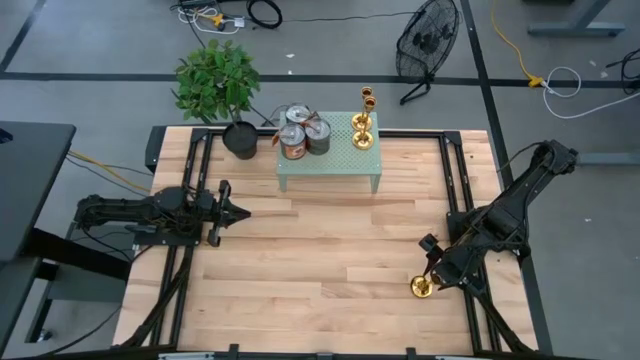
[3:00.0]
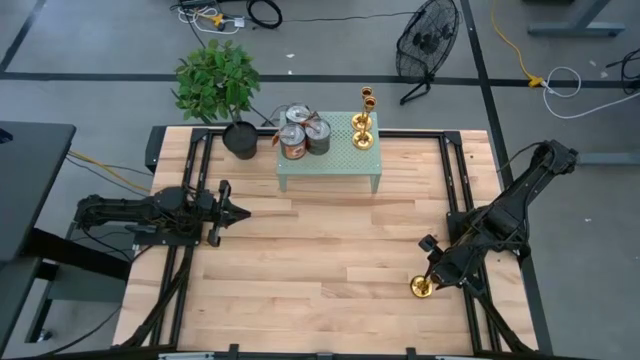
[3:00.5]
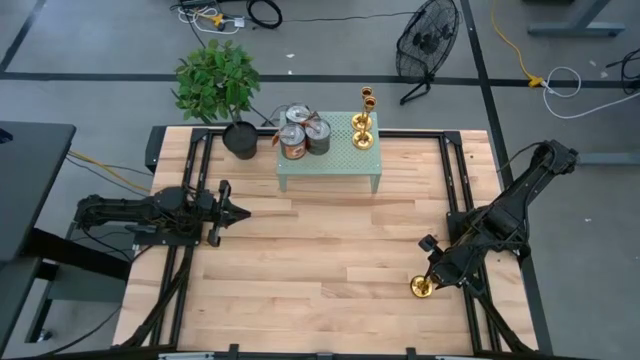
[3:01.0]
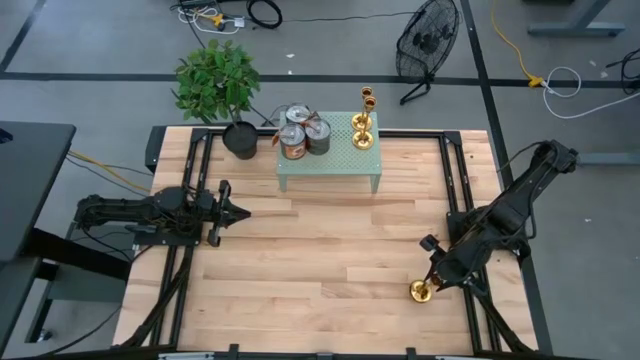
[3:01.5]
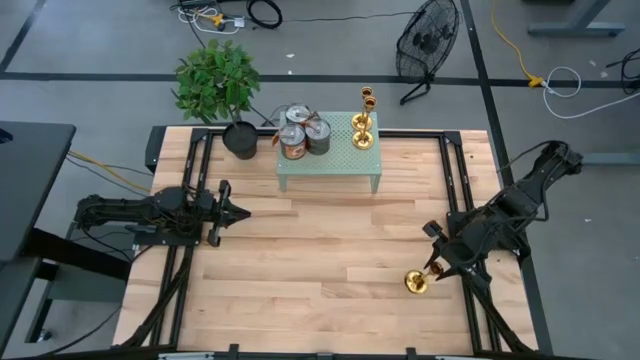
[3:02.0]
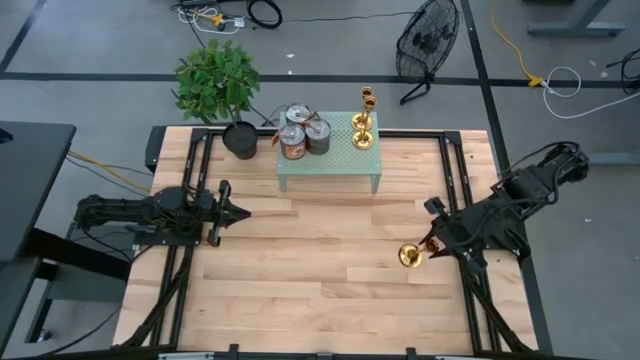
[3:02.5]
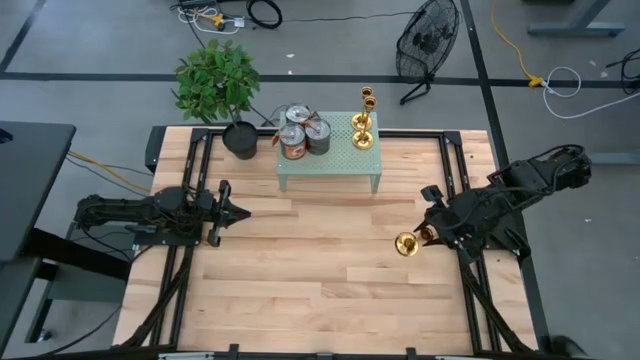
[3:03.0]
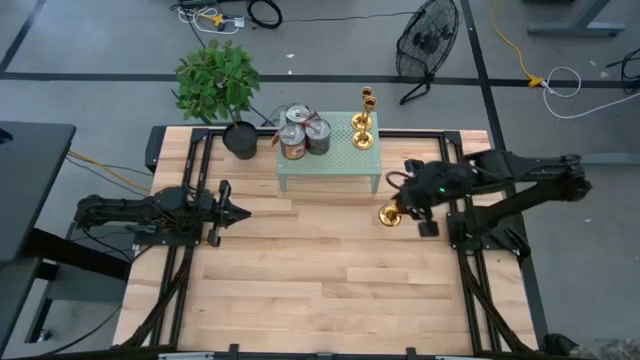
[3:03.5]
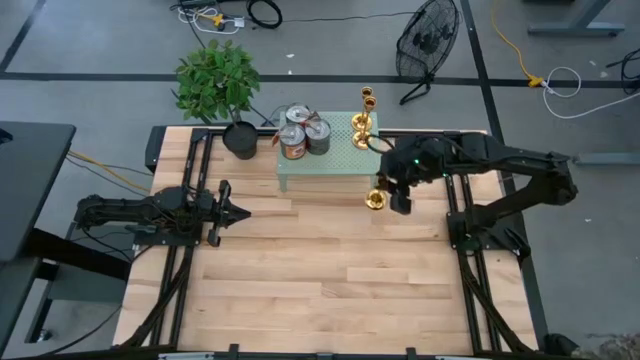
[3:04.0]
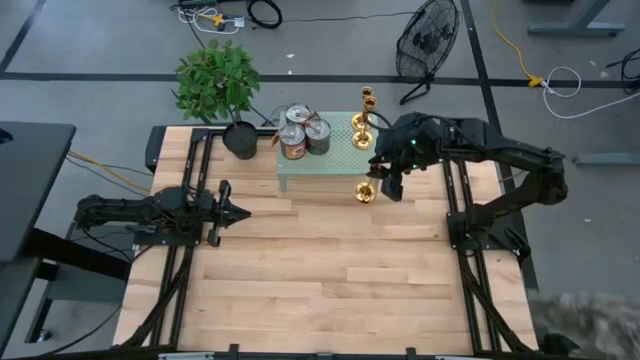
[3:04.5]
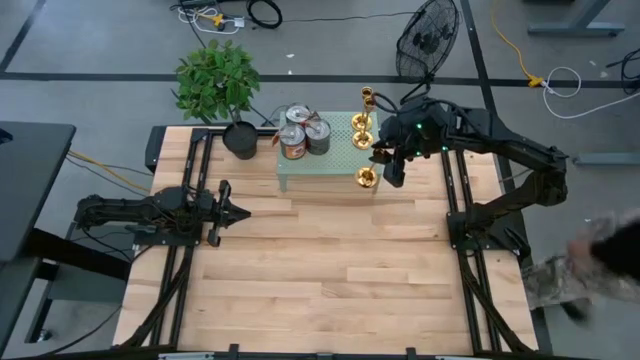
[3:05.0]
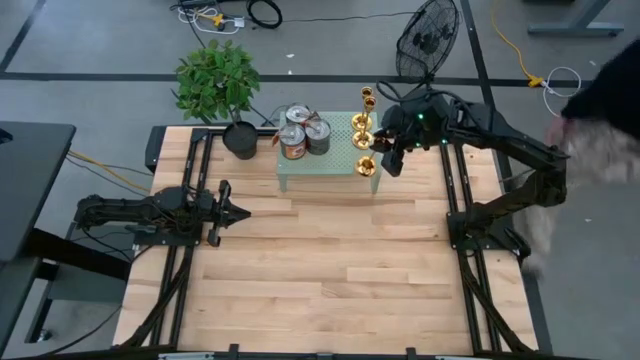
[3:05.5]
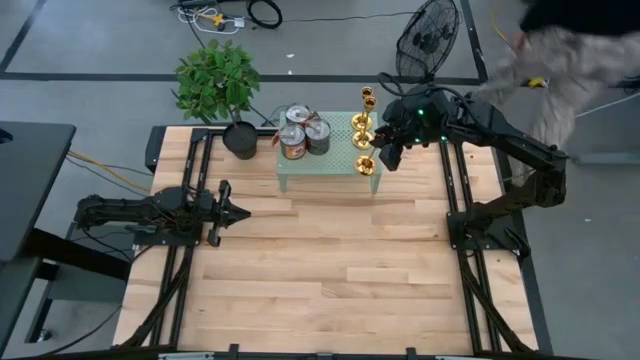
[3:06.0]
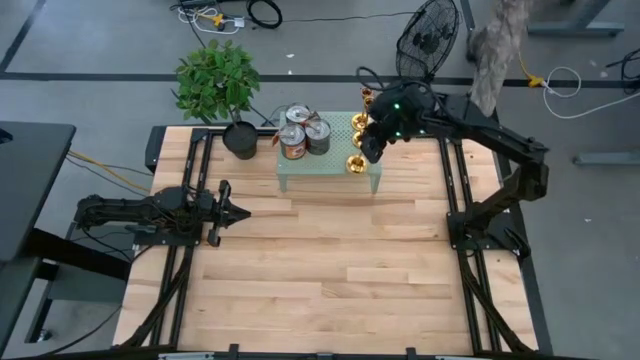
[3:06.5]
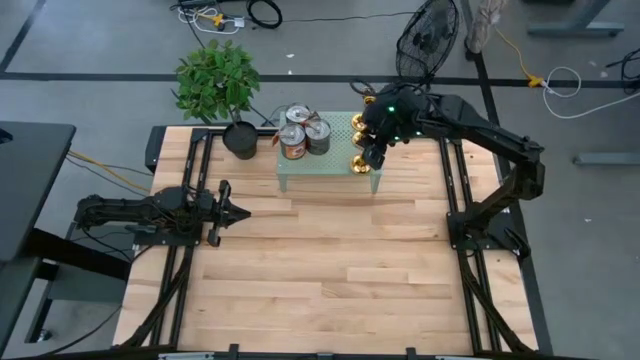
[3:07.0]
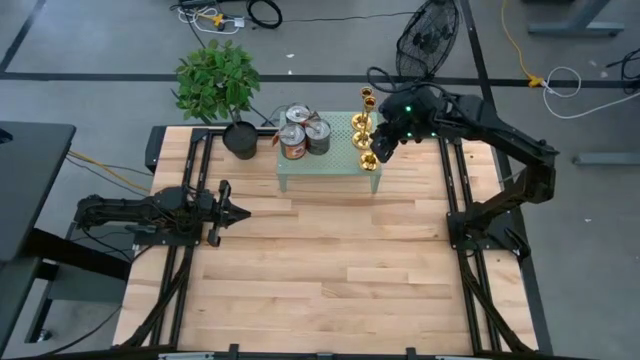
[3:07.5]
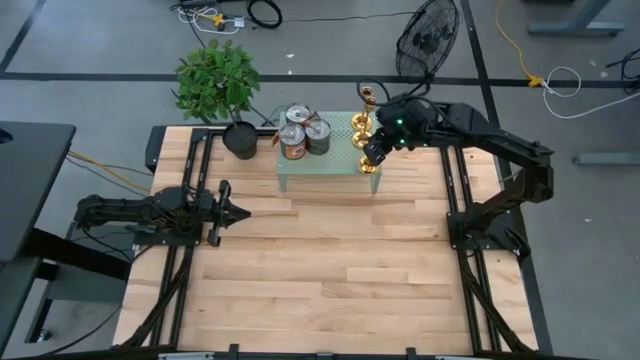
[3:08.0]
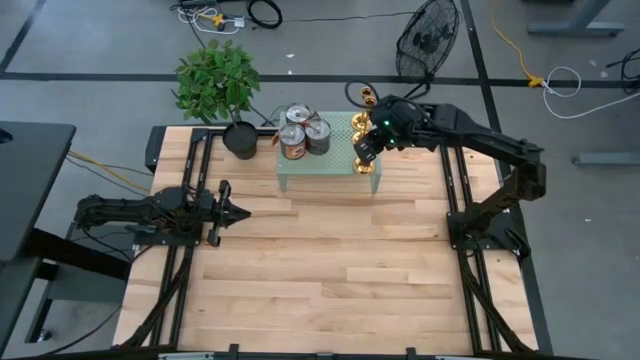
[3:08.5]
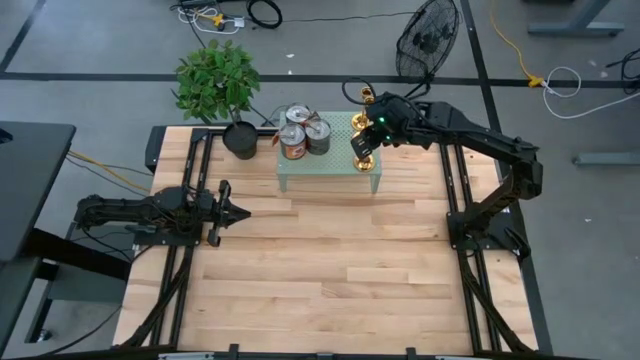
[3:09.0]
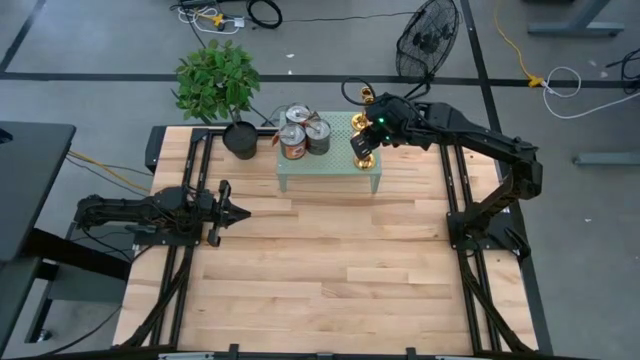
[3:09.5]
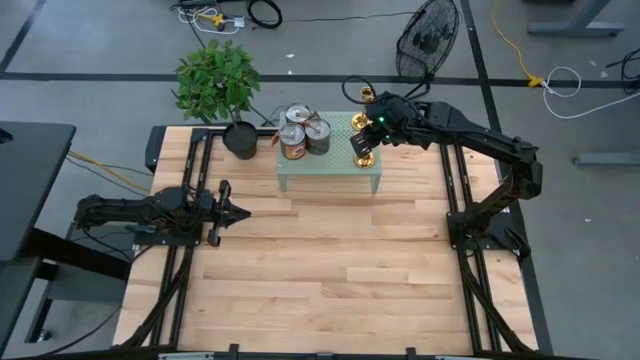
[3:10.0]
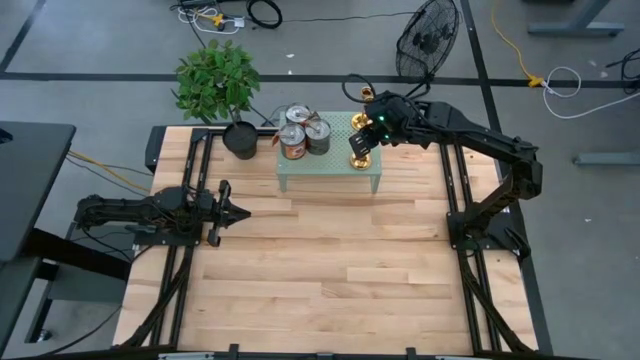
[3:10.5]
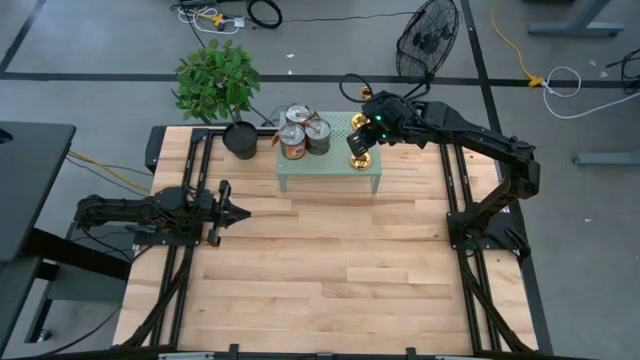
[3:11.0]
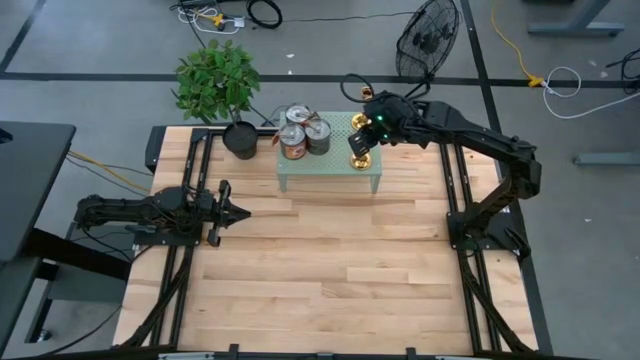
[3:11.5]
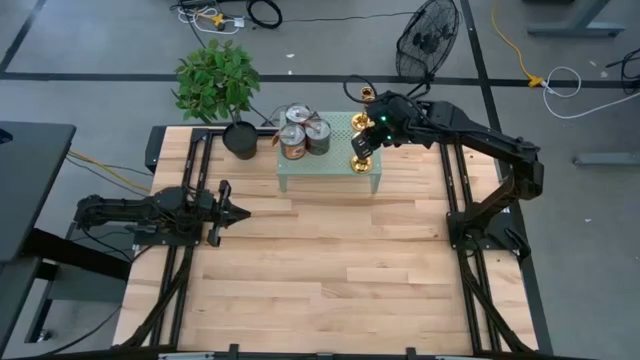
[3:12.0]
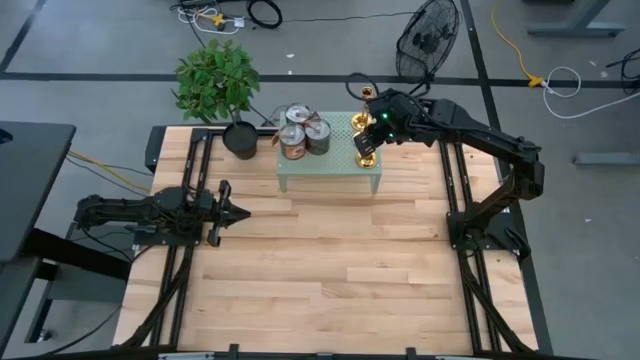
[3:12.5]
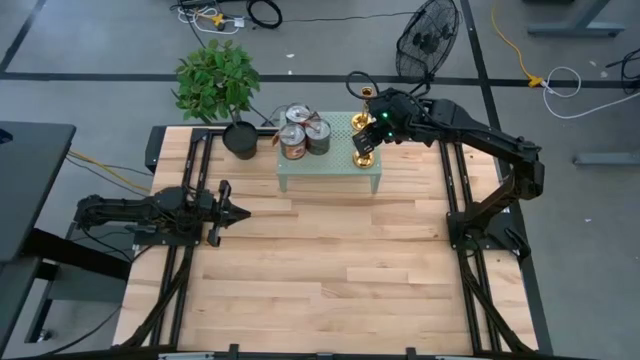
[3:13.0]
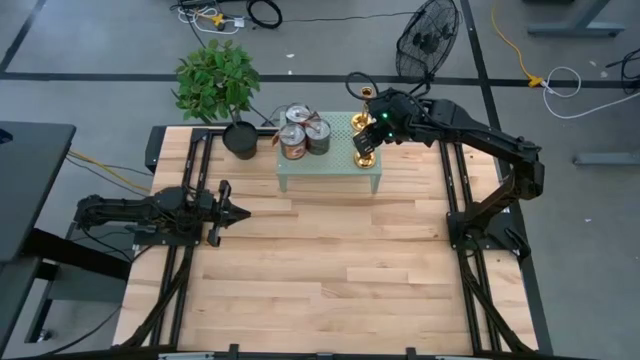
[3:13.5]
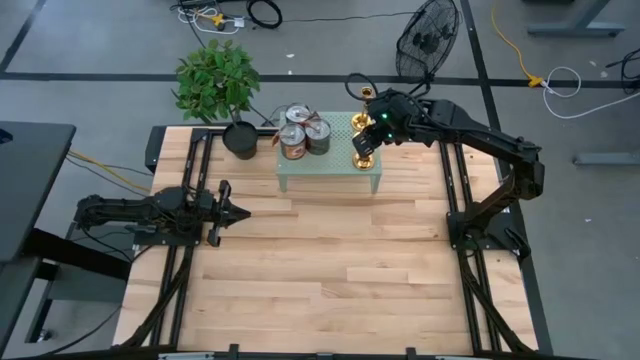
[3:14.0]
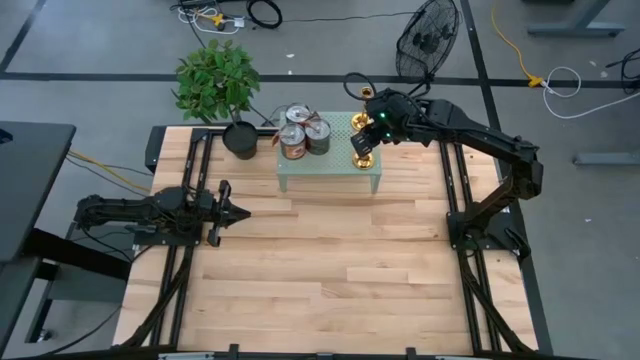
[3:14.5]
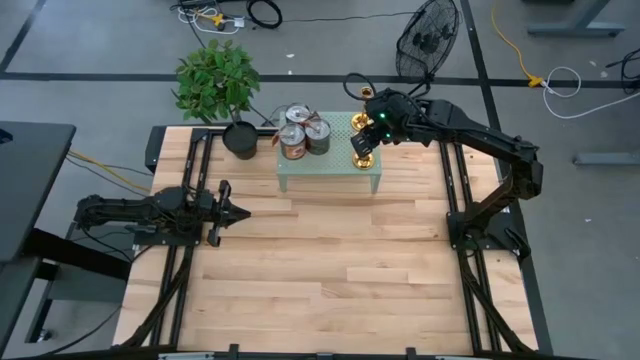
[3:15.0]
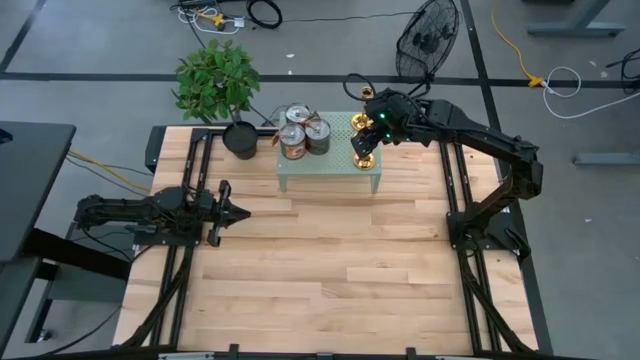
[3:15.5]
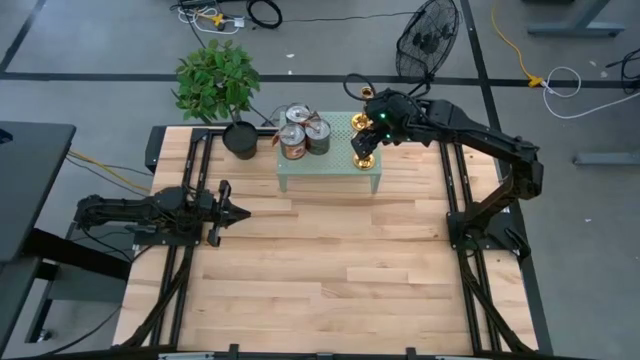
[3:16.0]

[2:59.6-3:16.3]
Task: Pick & Place candle stick holders
Put the gold candle holder on the shelf

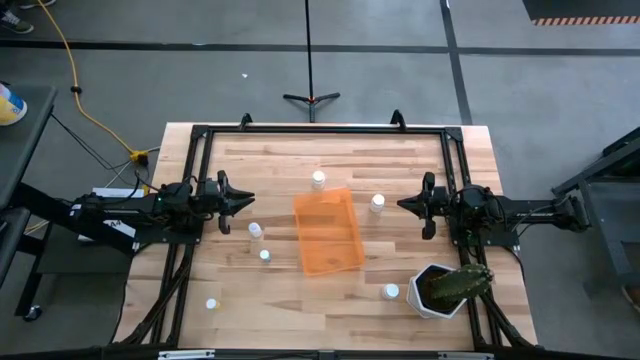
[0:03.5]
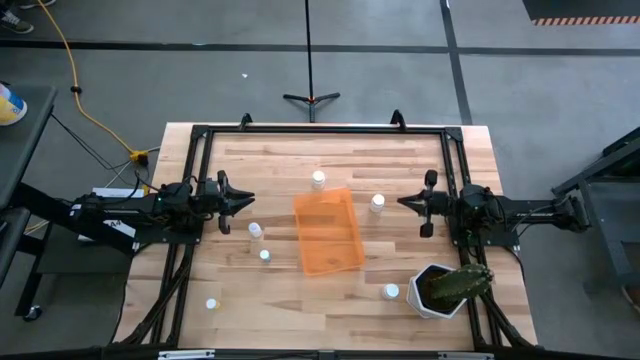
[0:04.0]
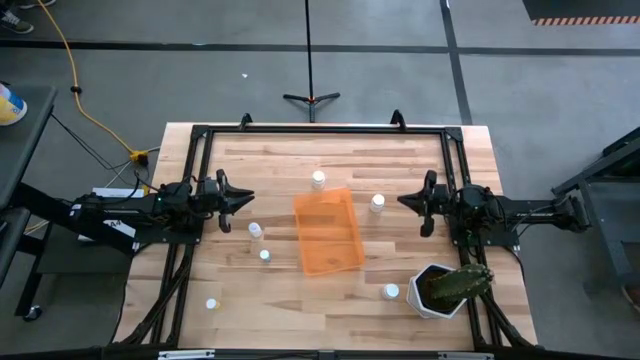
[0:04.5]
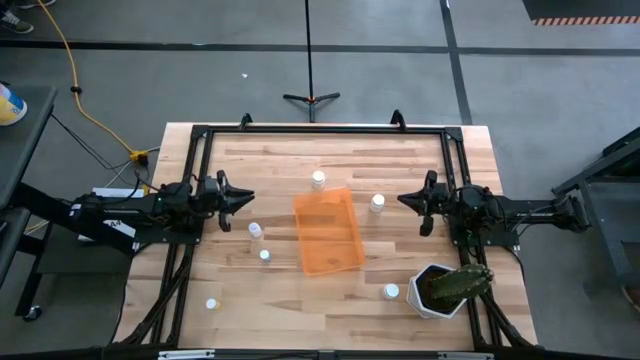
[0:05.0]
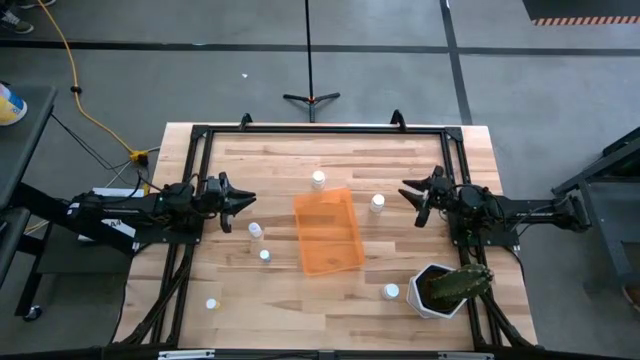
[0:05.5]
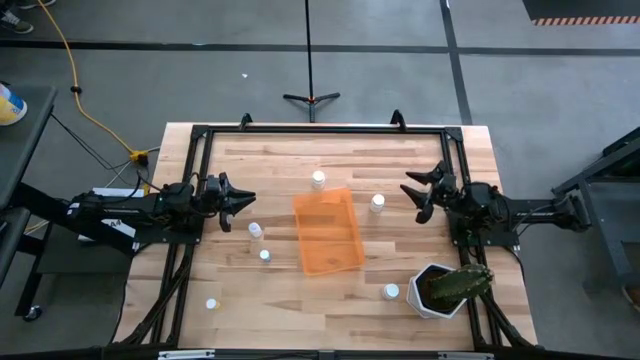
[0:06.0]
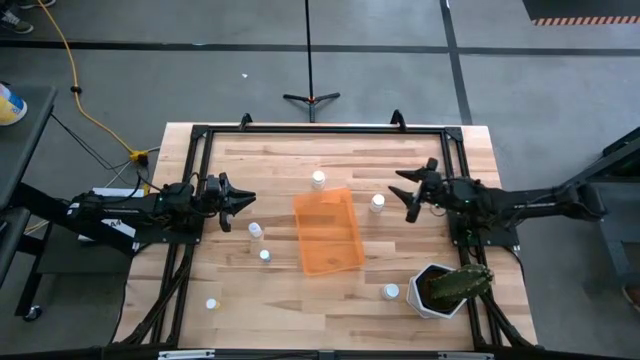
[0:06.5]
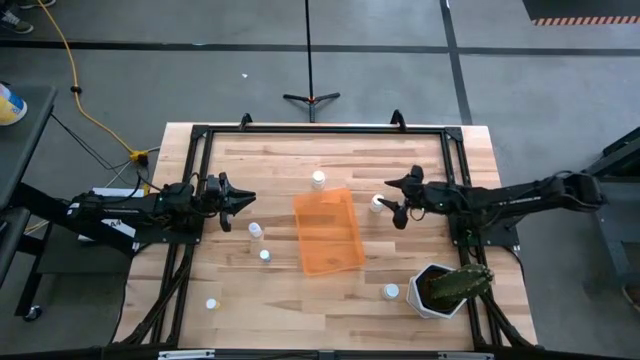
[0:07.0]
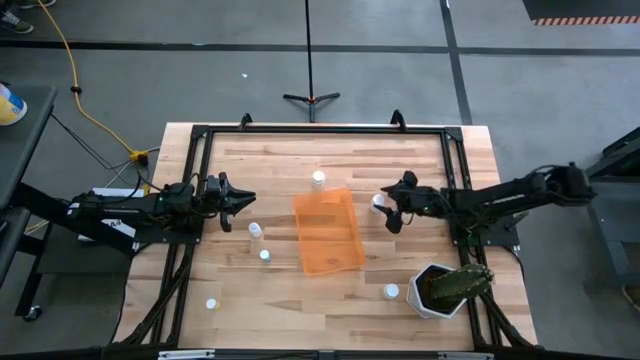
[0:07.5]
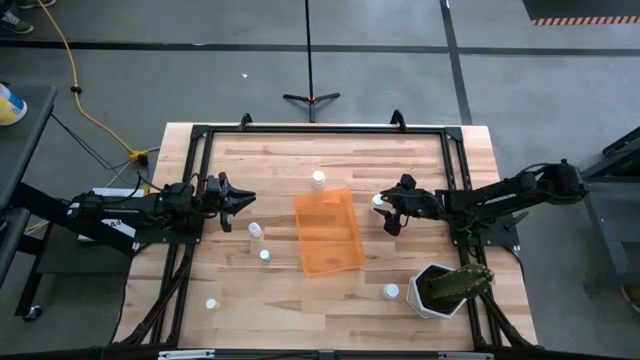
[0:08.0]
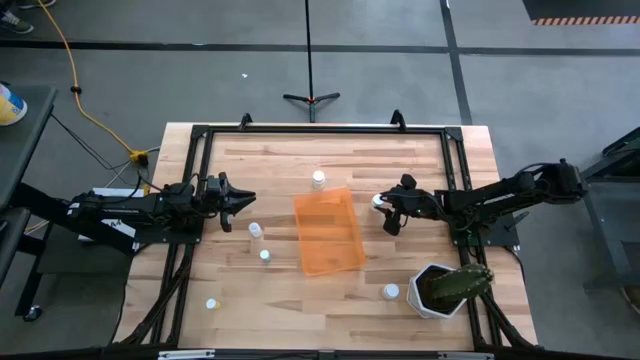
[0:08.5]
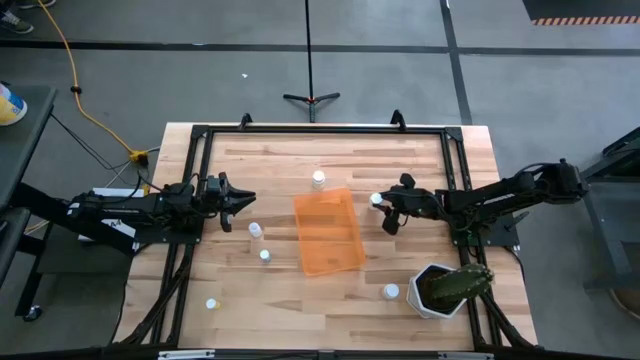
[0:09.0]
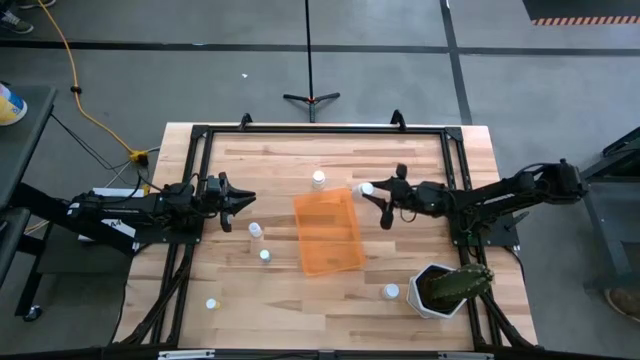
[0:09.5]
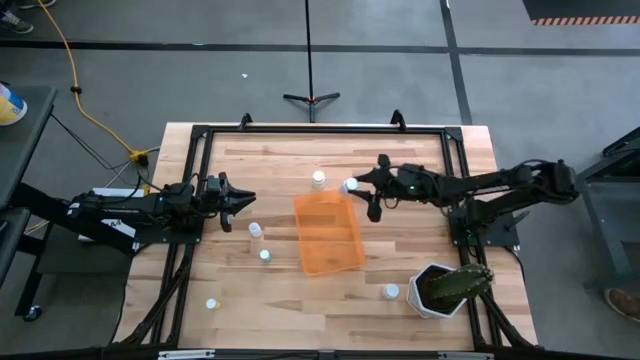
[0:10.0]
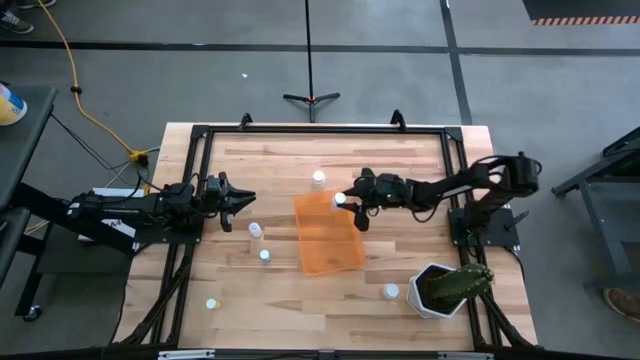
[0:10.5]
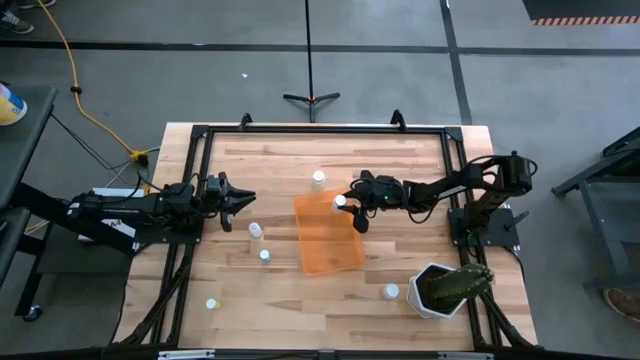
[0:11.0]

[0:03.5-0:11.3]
Task: Pick and place pill bottles into a basket
Put the middle large white pill bottle into the bin
